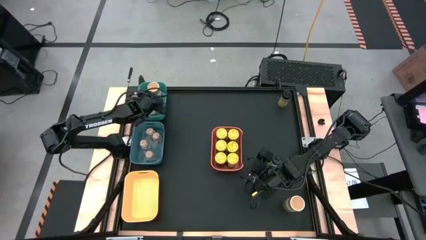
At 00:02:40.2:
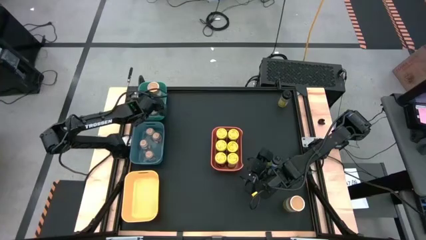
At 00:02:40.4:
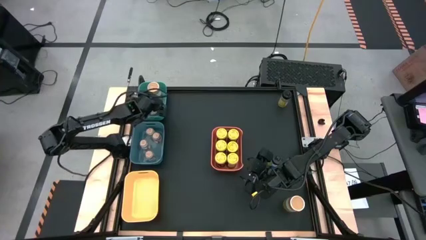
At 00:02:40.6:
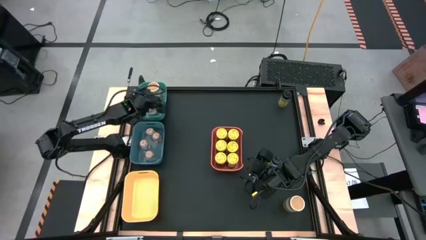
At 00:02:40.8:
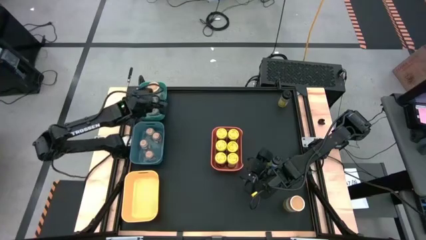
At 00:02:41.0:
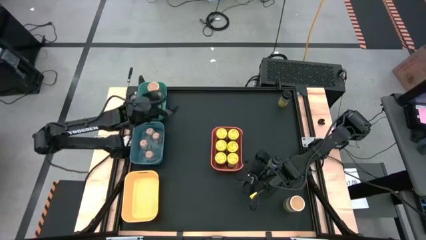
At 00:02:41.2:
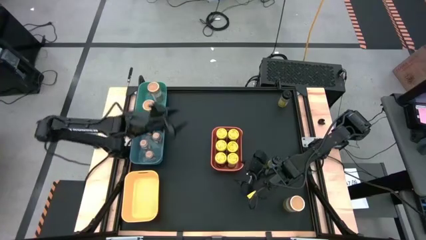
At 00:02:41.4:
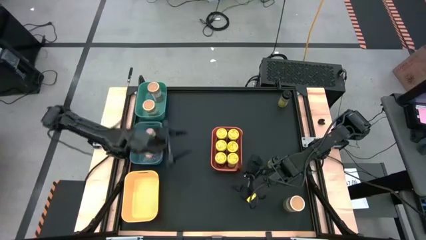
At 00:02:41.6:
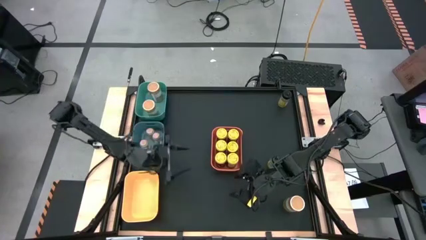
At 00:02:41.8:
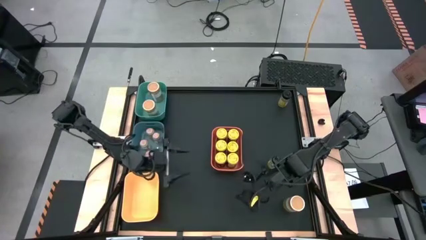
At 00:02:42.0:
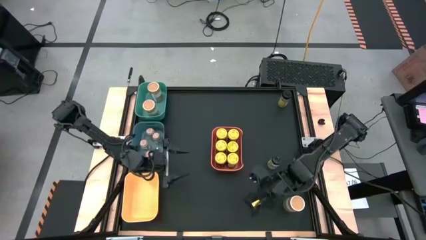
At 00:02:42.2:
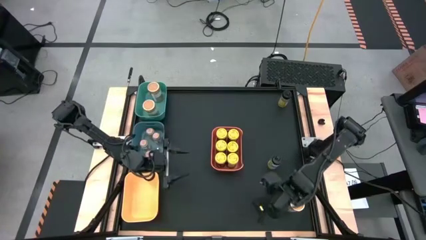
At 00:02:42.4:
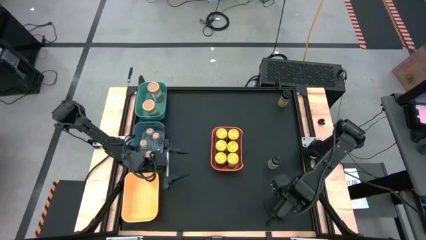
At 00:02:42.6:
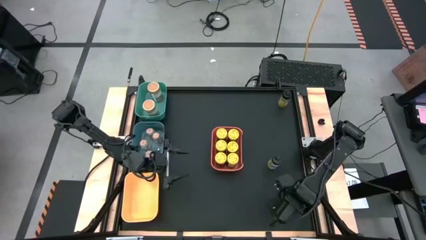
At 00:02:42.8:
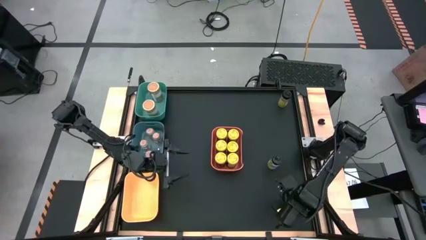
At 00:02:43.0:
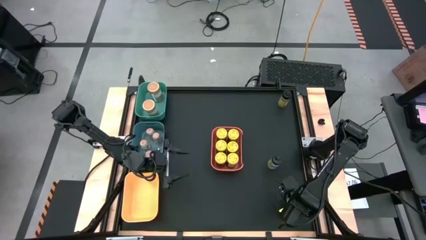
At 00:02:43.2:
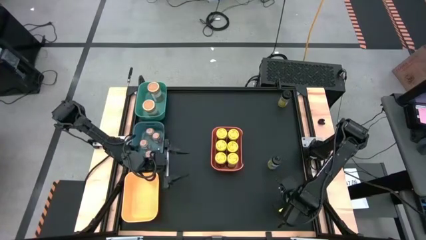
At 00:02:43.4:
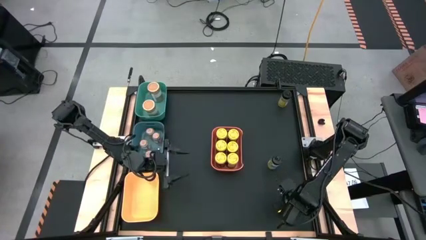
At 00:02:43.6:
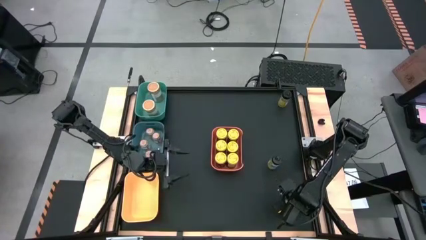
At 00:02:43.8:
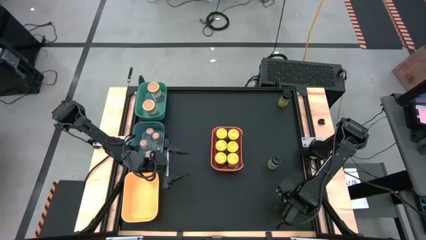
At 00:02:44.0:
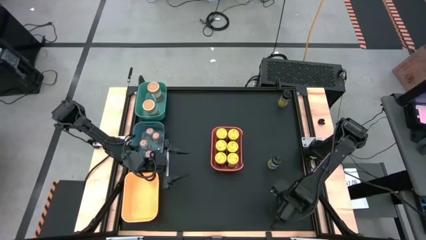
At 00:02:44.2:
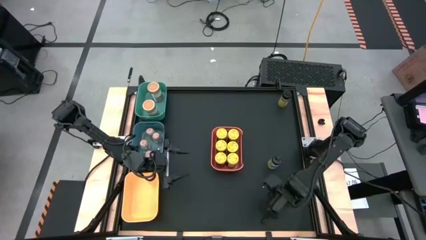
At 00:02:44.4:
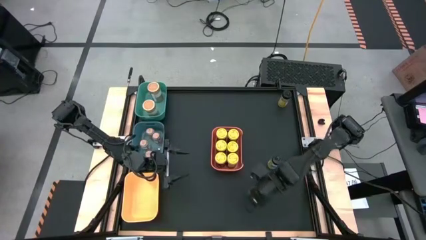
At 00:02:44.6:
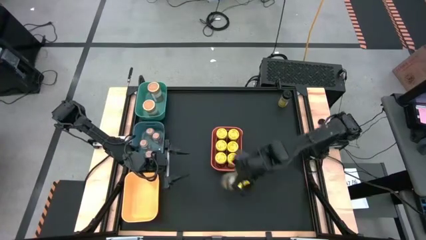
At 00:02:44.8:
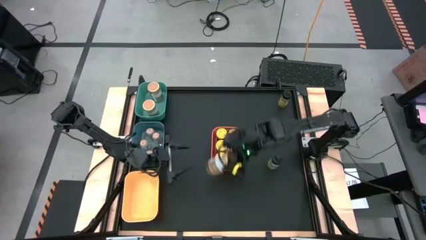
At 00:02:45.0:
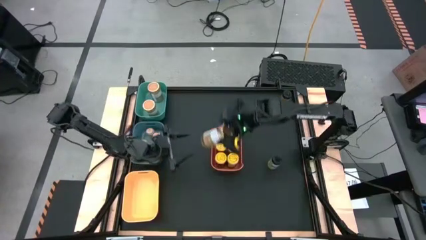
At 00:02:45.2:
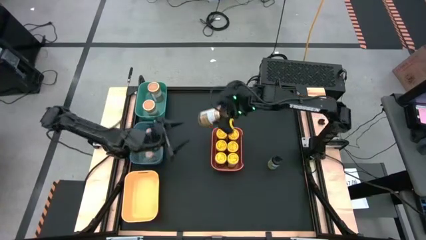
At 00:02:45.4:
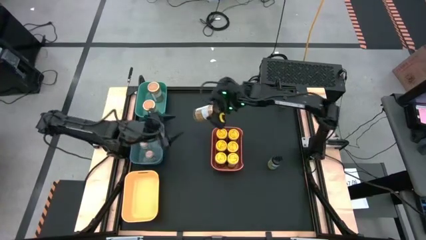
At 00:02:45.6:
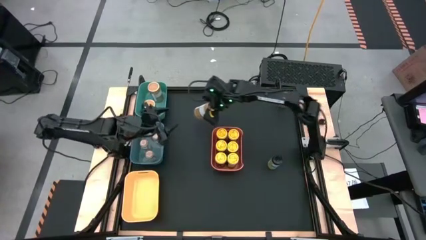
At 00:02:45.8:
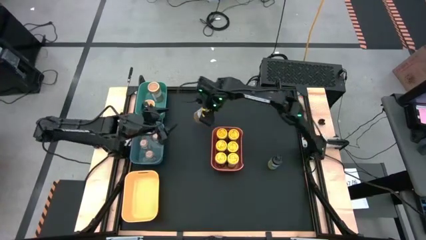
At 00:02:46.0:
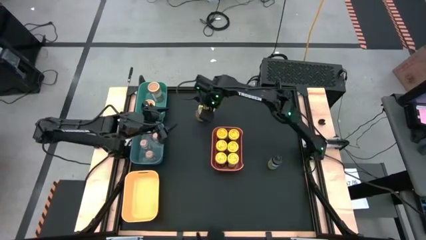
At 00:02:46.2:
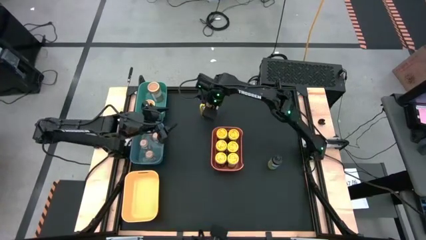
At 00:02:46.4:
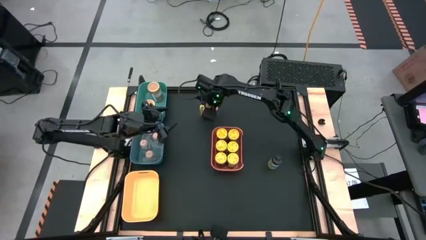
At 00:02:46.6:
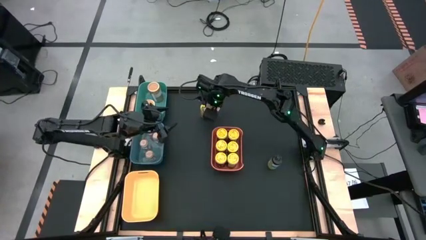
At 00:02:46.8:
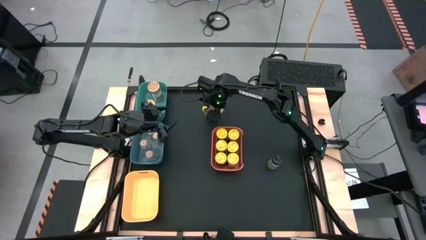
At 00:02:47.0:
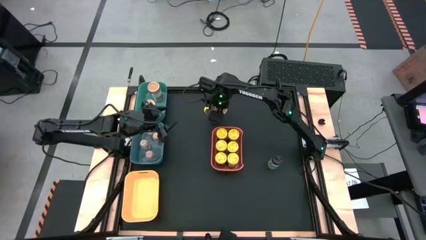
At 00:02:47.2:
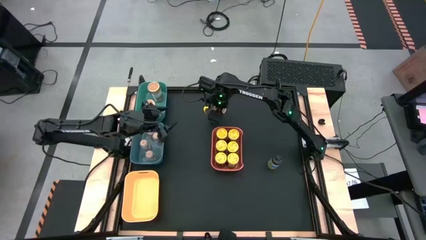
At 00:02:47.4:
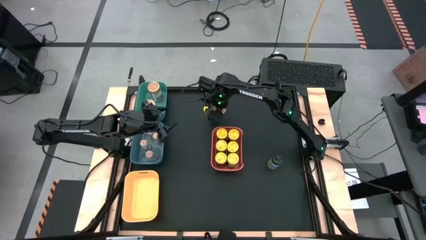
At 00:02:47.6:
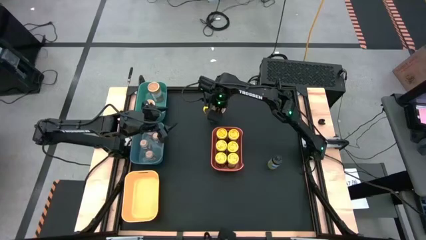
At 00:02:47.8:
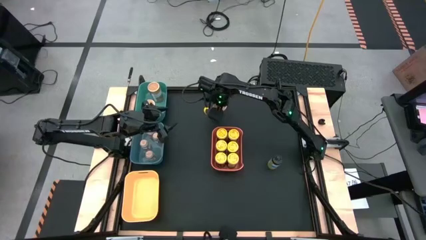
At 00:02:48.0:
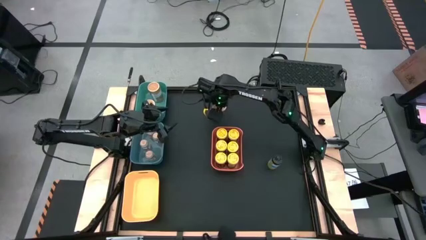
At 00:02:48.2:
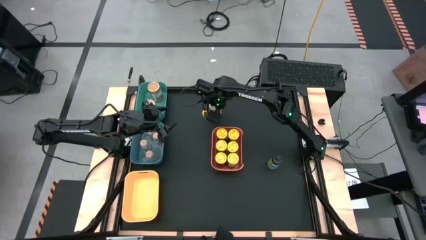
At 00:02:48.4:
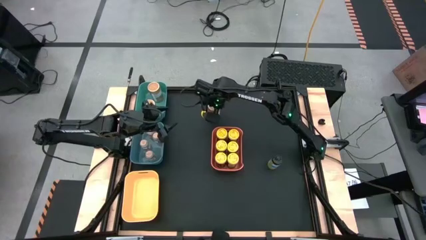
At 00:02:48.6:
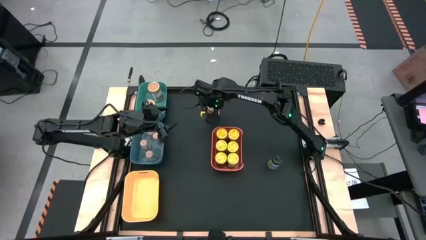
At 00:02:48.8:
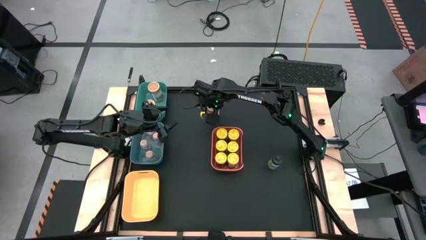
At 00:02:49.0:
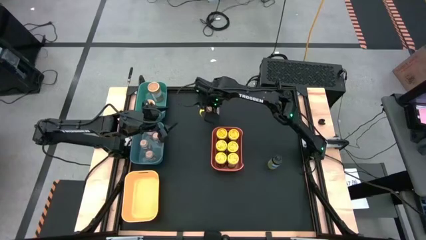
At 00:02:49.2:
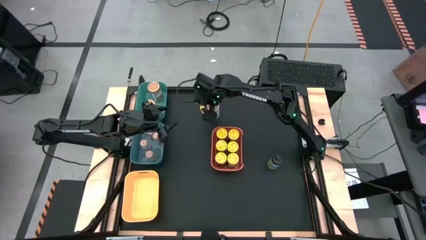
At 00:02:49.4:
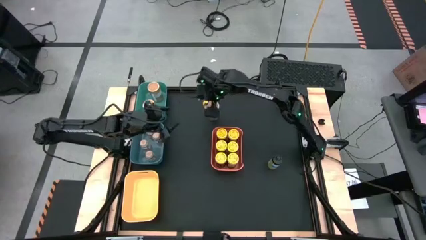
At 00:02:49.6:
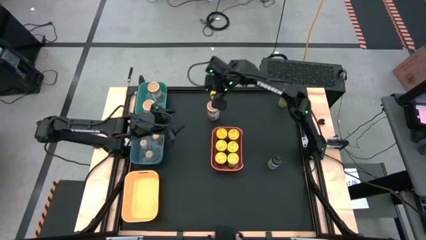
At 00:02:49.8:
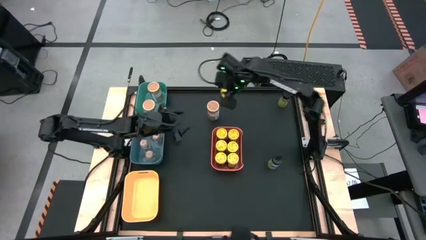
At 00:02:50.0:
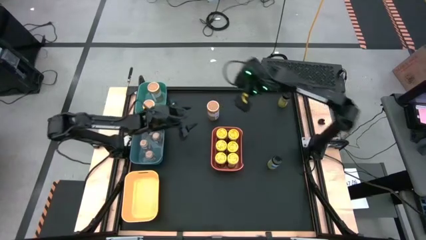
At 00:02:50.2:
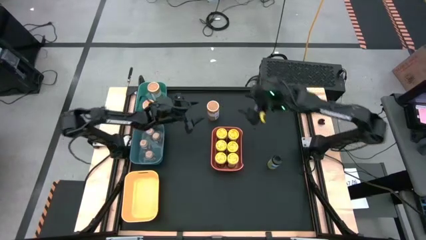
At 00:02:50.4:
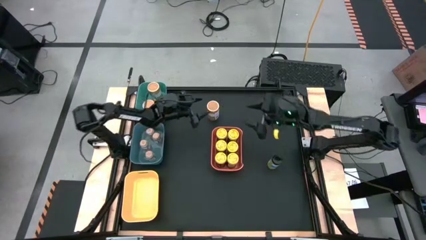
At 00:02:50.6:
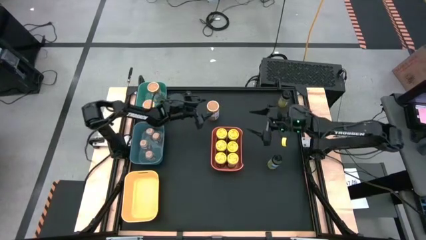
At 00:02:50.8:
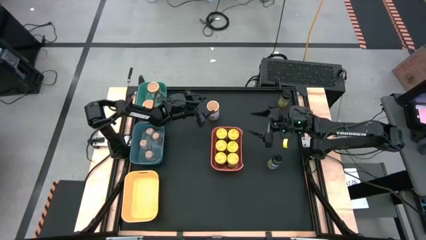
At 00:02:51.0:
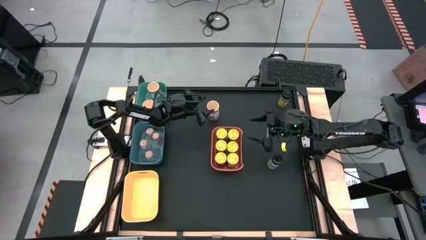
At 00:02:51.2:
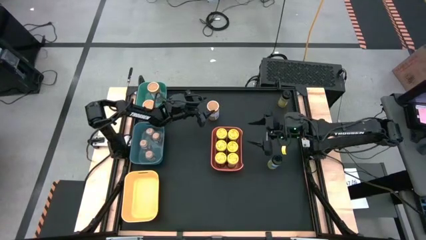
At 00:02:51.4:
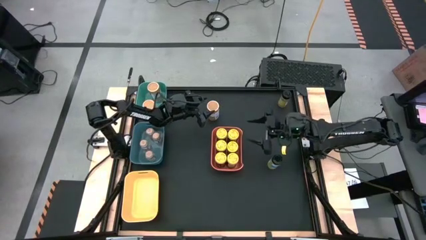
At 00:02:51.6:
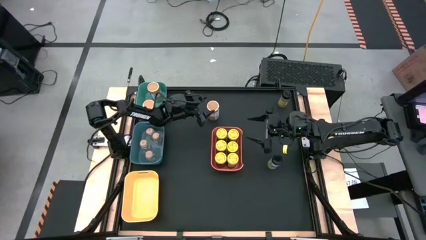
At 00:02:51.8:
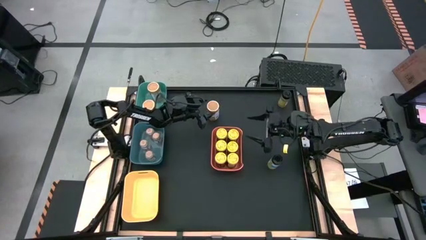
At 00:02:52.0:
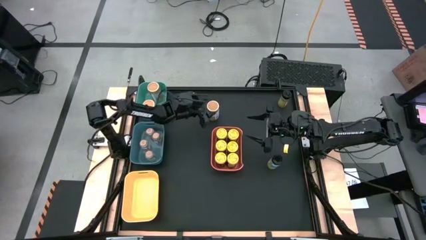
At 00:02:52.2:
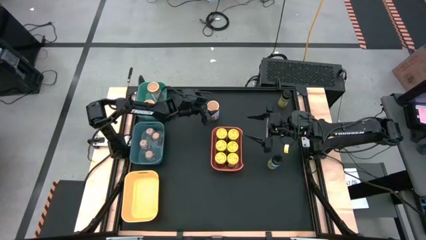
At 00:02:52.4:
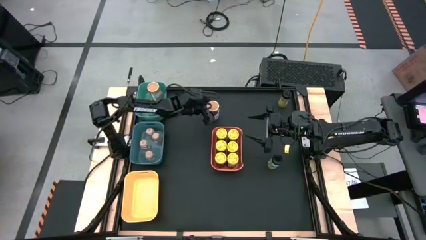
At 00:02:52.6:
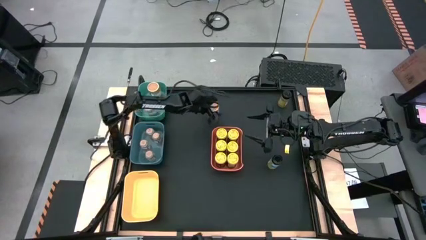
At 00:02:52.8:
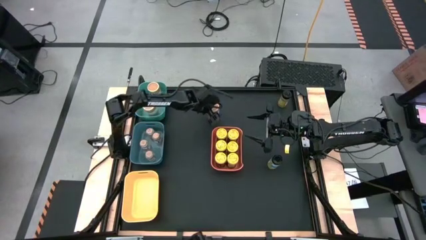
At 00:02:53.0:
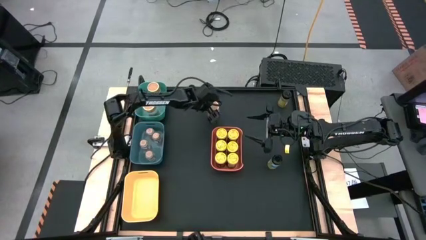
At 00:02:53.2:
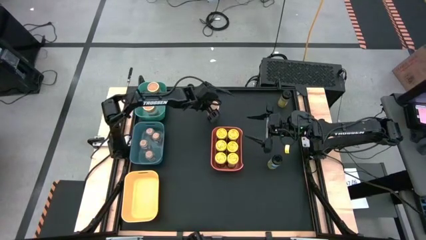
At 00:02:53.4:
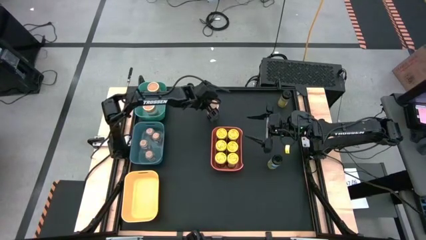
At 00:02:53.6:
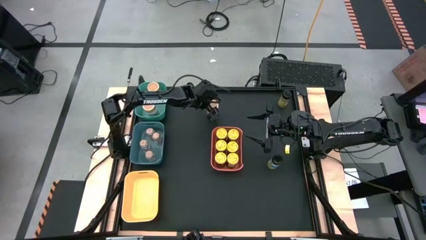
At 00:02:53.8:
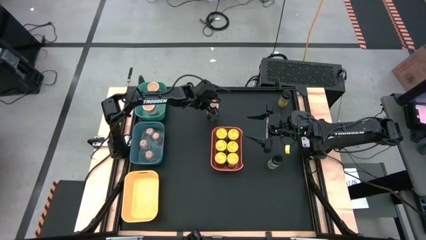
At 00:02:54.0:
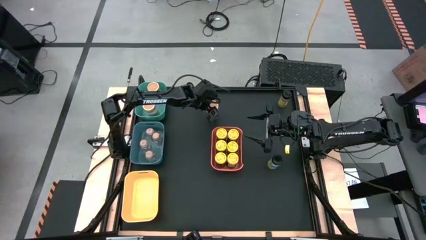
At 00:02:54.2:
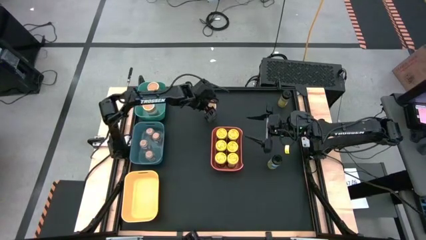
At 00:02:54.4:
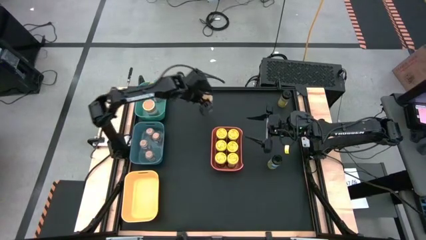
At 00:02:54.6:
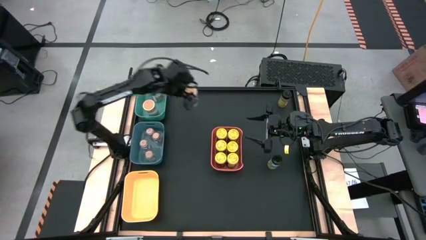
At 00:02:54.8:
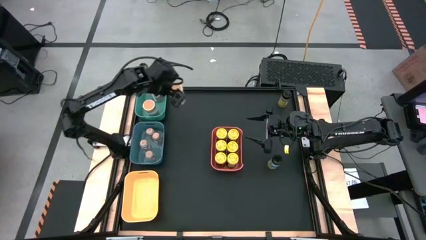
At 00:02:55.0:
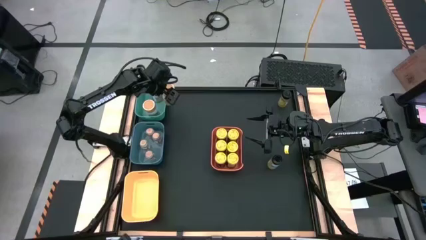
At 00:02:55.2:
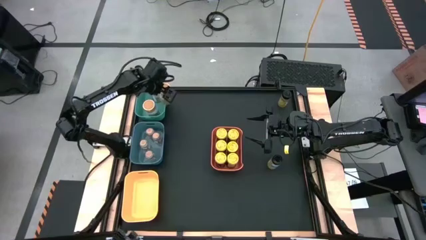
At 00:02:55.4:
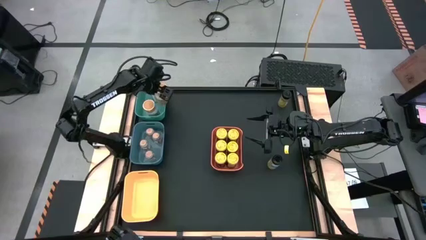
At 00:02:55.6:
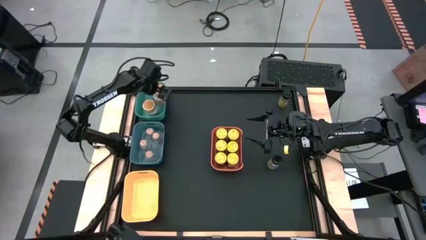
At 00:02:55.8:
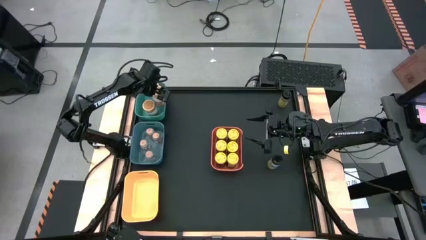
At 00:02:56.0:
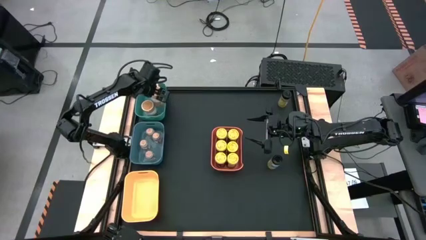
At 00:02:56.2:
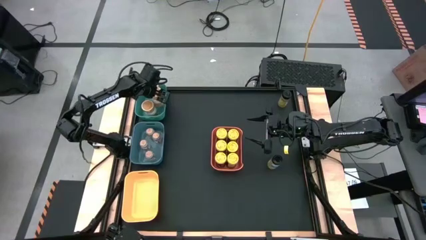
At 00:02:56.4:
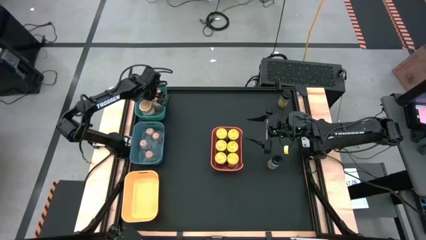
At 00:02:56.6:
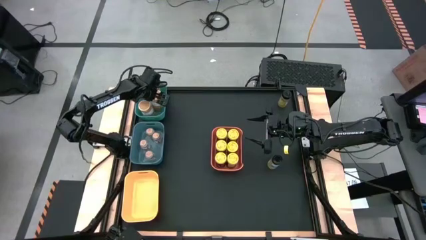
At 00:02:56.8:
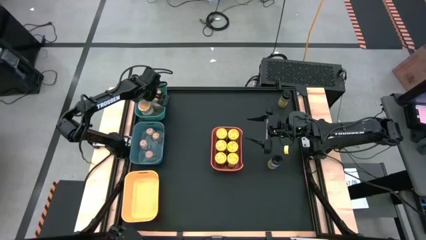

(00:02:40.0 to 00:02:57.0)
Task: Sort spices by type
Put the golden seasoning bottle in the green bin
